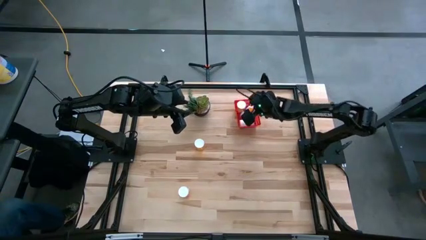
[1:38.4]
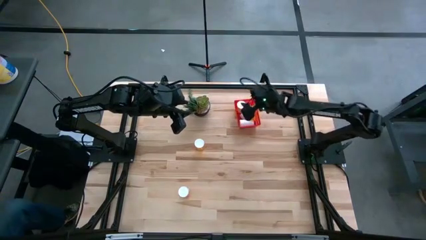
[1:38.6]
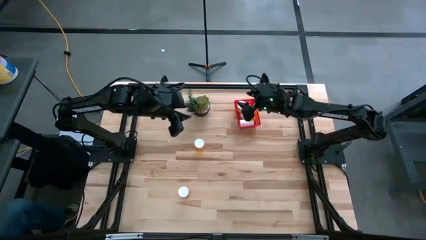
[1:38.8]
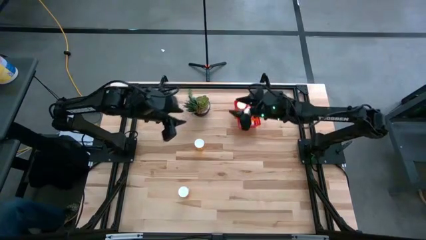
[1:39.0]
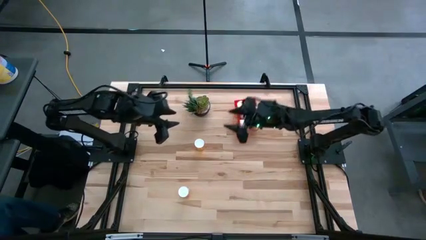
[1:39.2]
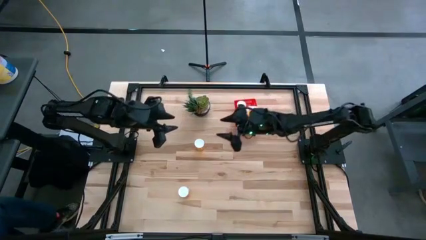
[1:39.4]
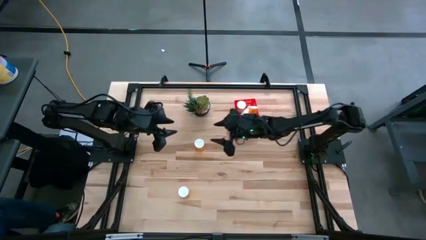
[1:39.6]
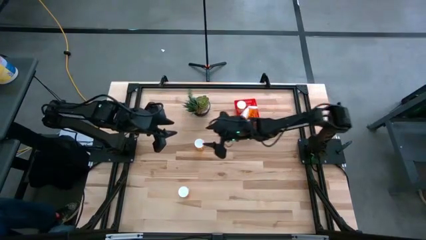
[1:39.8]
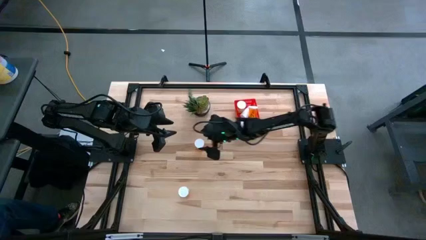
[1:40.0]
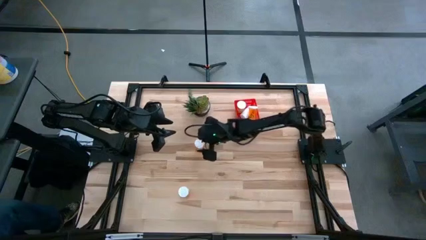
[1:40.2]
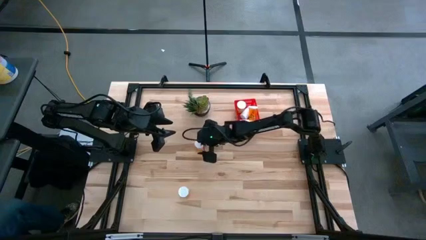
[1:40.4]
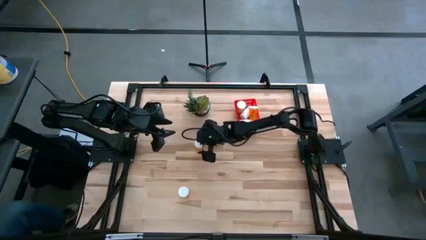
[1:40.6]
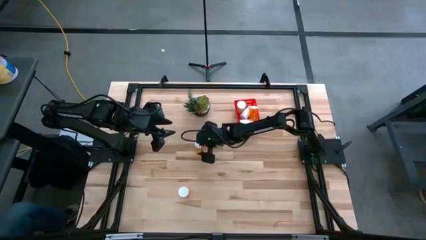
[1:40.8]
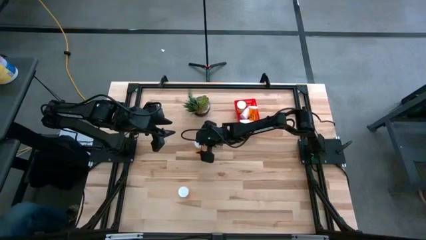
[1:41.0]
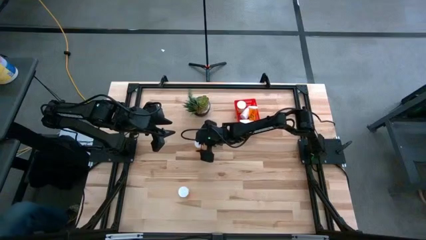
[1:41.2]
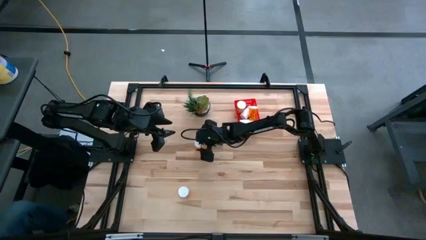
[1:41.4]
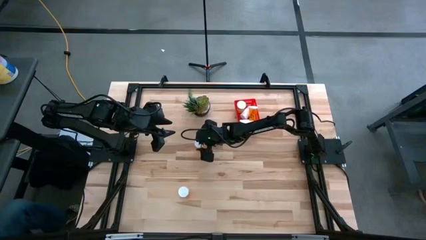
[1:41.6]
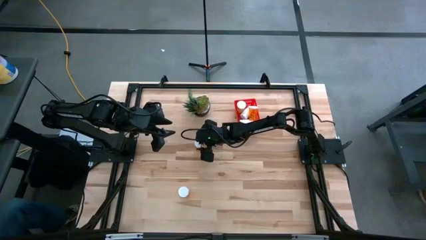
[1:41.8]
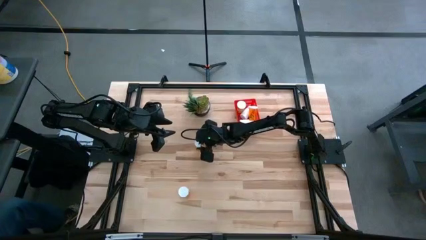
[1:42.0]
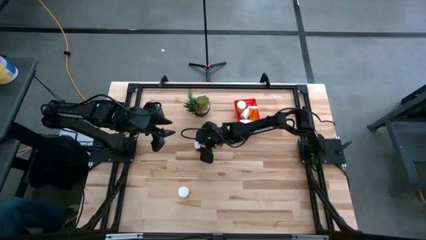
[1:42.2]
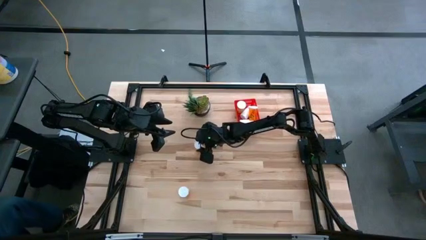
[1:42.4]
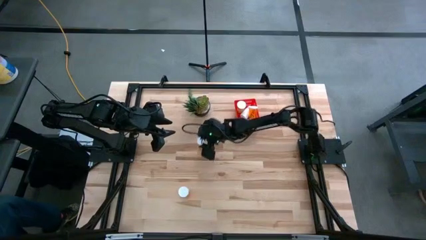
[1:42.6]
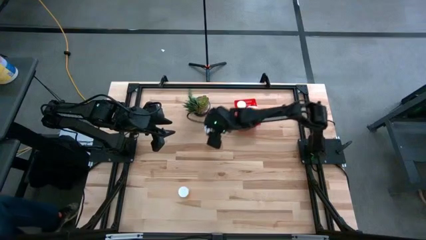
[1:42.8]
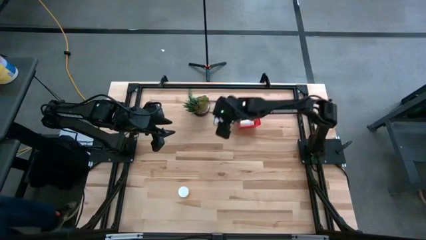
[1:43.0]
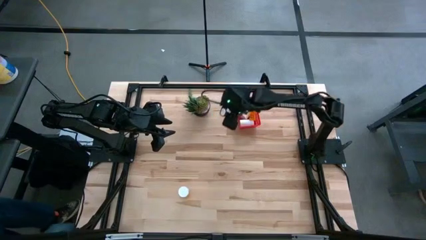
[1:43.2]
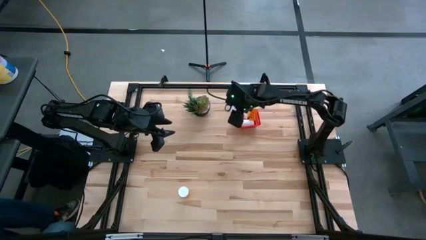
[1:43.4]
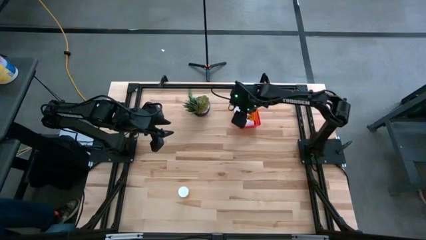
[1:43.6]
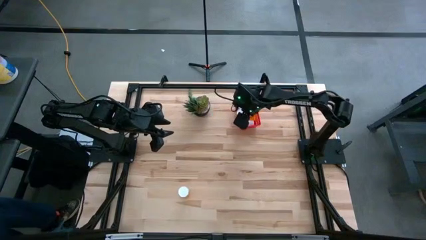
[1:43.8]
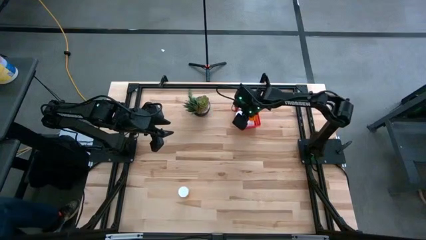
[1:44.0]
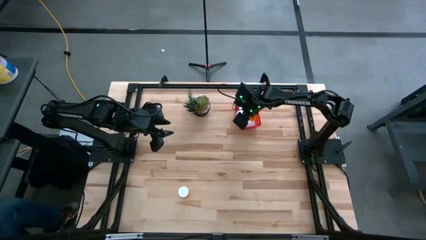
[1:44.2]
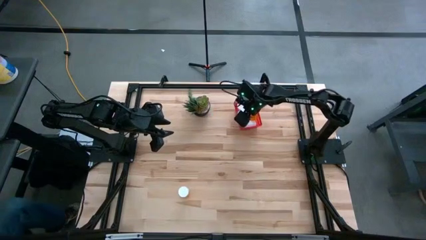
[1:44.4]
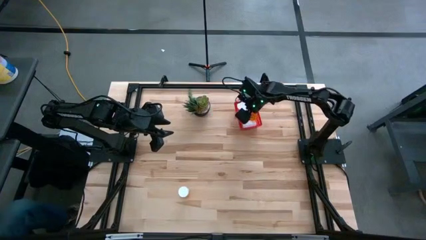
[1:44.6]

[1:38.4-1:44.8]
Task: Pick and place pill bottles into a basket
Put the top orange pill bottle into the red bin

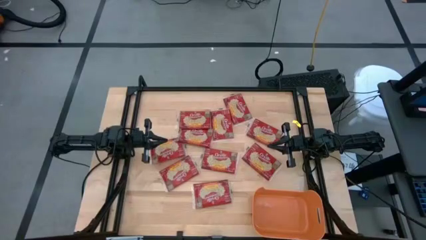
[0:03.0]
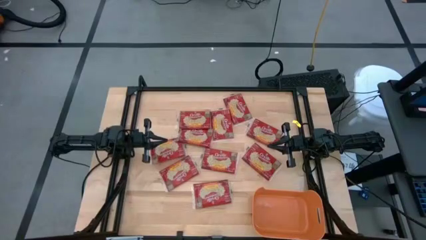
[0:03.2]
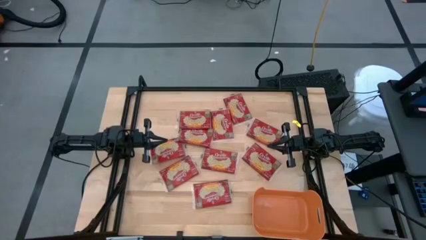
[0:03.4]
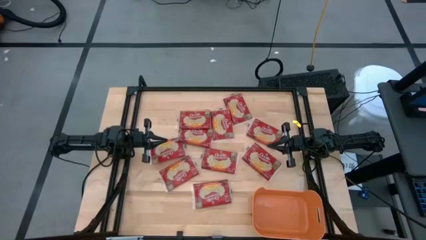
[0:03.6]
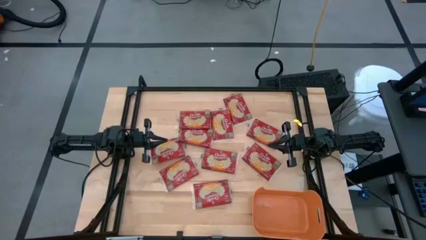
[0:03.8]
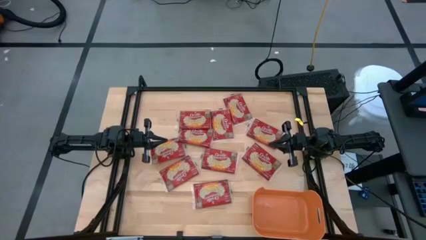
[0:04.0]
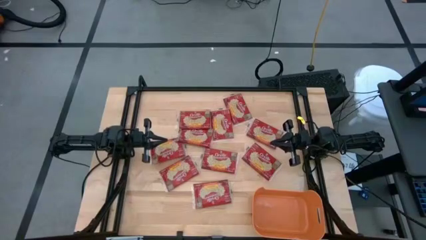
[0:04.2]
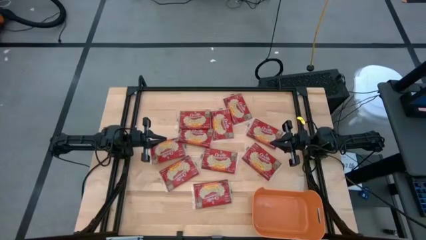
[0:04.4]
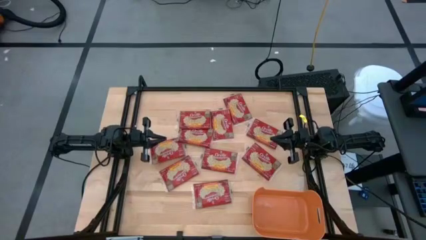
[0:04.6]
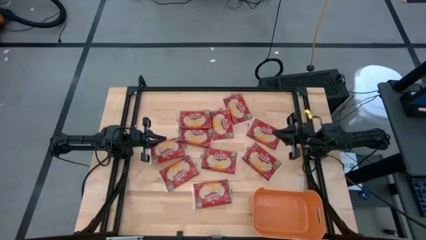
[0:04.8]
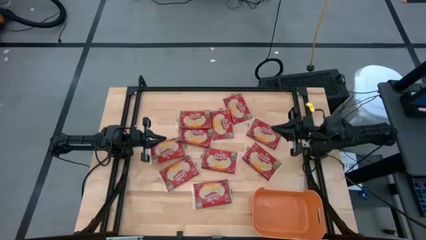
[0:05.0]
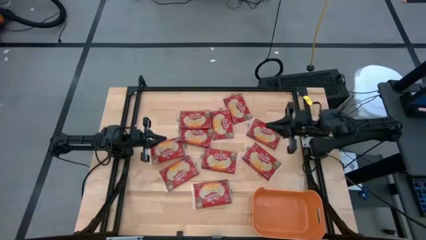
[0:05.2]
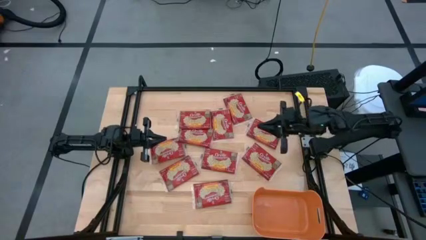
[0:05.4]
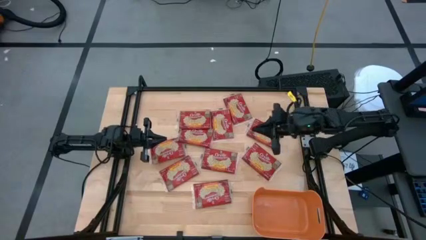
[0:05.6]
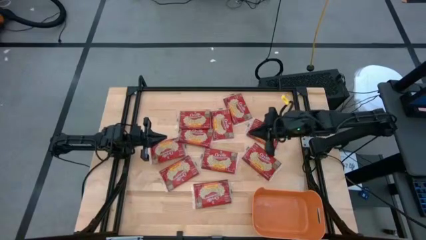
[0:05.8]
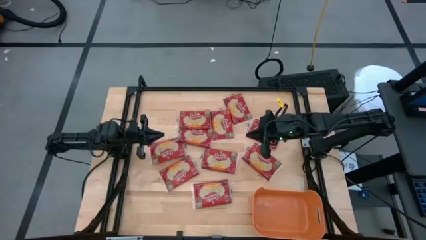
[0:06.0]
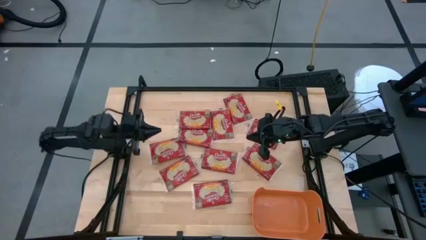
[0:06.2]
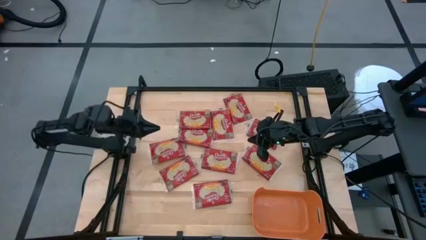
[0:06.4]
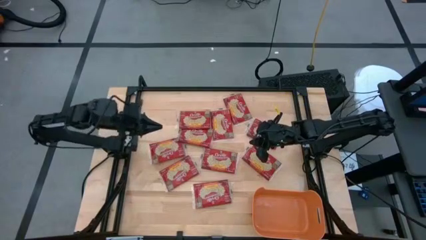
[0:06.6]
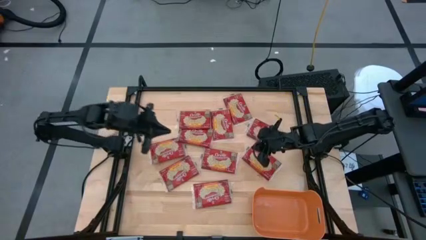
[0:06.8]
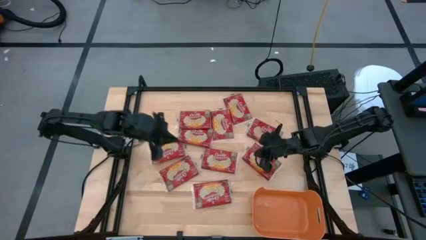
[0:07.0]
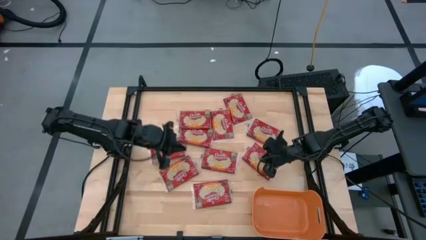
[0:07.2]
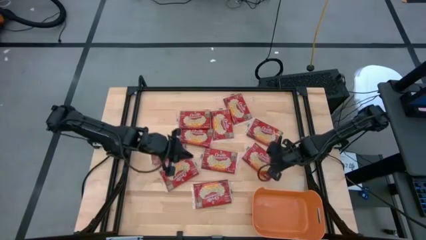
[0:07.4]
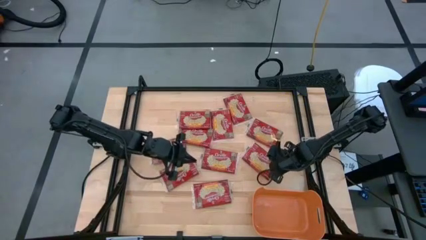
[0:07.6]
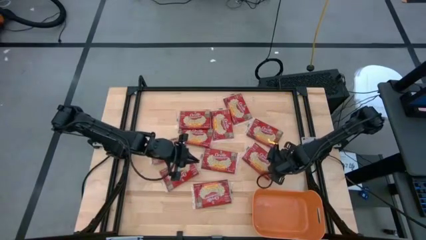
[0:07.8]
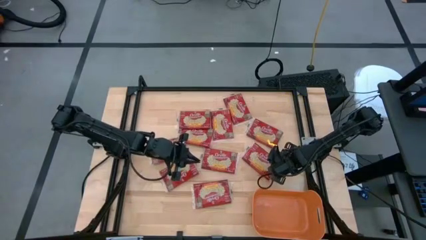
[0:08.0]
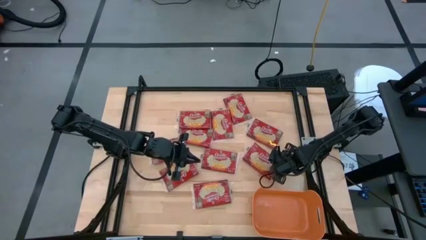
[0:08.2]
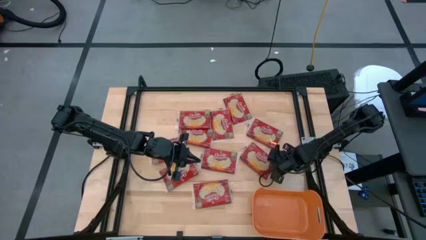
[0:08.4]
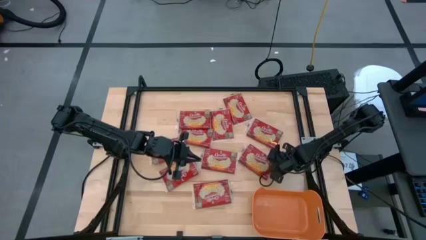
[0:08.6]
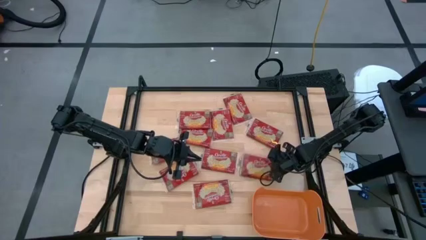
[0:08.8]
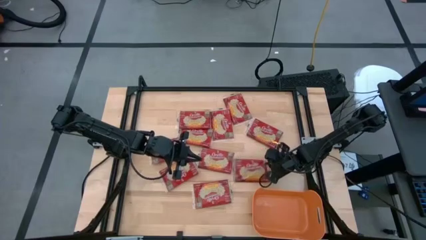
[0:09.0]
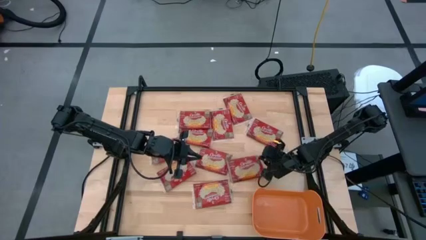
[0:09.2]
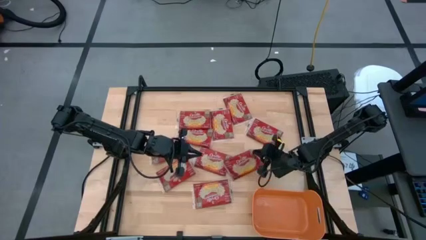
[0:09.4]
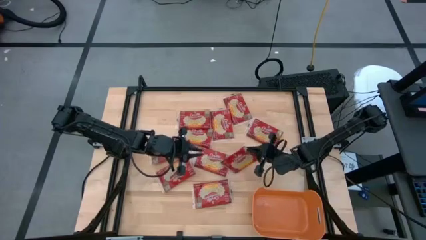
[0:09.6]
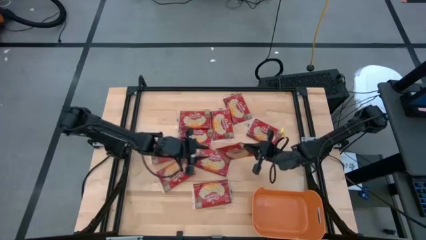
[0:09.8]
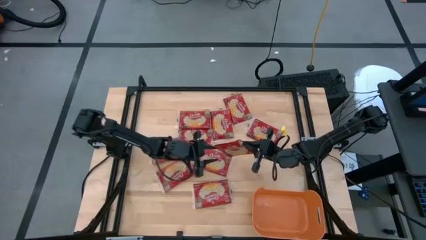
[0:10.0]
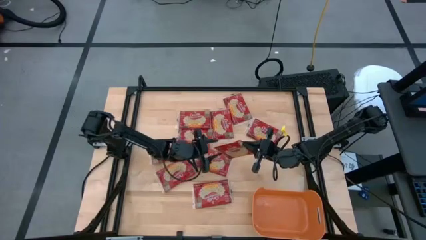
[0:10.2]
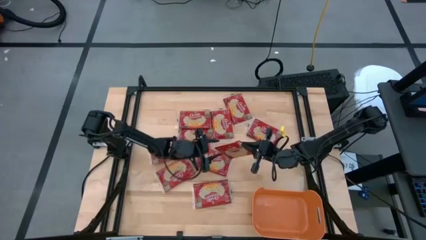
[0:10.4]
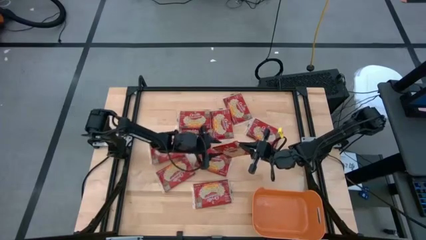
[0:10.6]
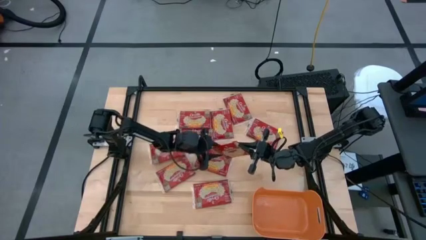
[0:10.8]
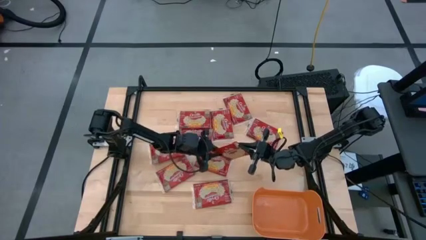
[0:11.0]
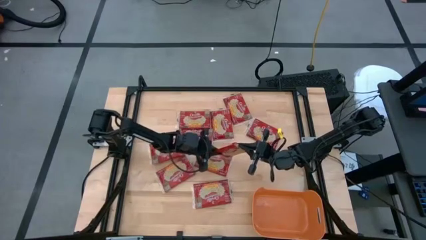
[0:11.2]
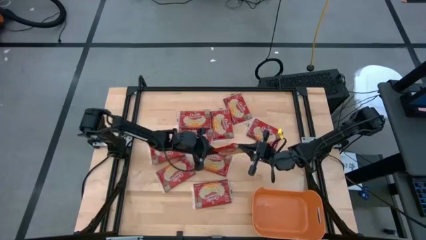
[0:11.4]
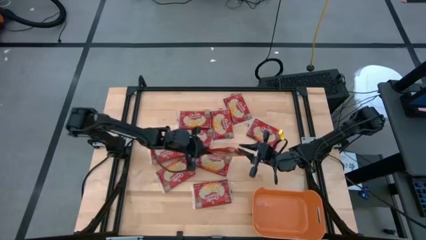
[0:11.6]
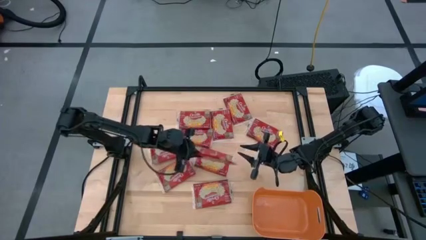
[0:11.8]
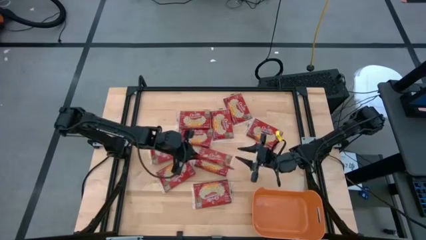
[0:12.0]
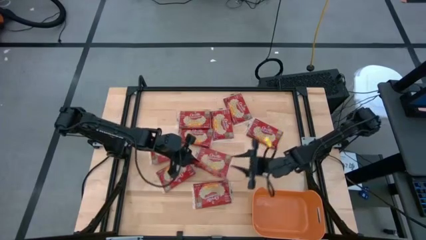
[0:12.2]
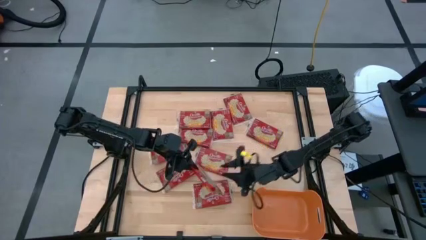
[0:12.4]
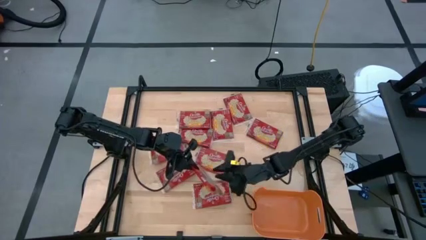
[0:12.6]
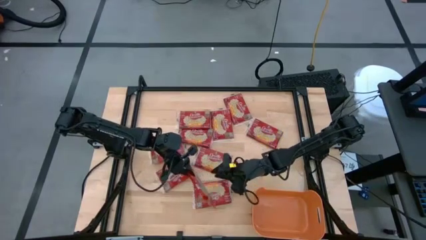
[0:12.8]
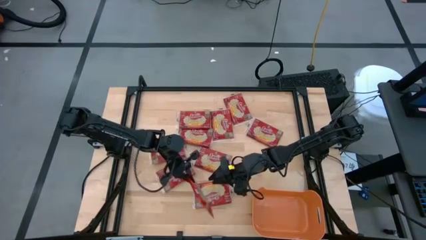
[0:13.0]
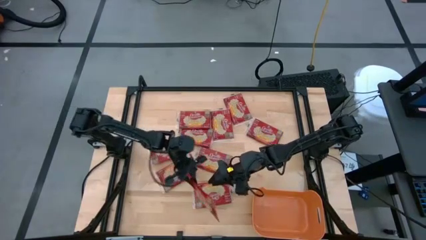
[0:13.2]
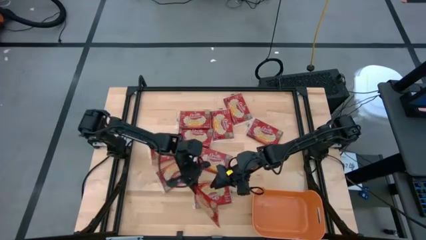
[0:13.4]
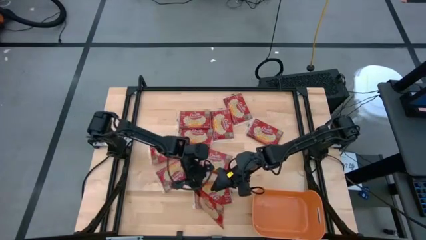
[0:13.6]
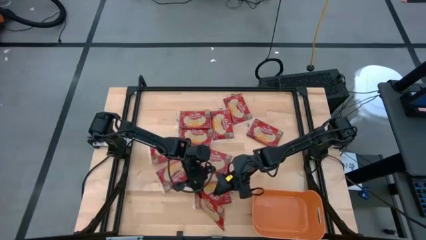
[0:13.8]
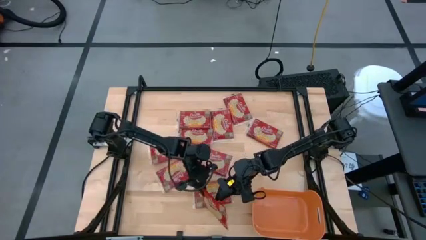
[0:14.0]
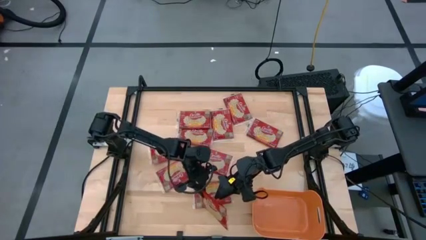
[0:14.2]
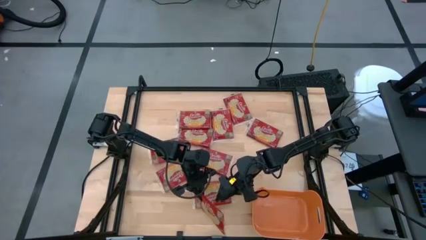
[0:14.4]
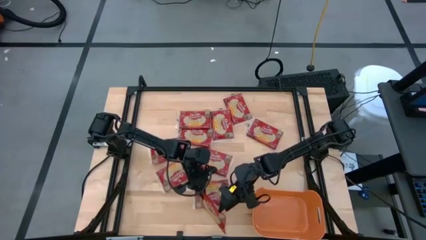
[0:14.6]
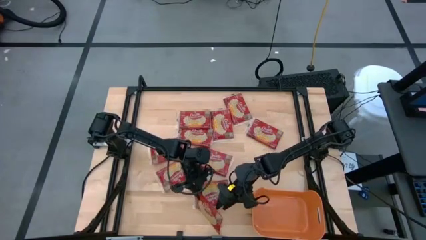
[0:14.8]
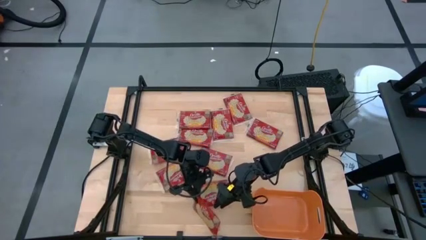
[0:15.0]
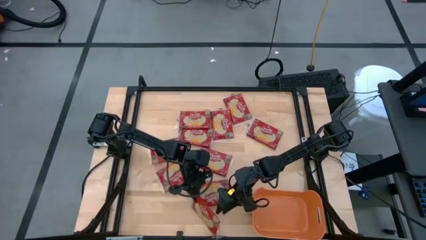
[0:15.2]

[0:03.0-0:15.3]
Task: Sort popcorn bags into baskets
Put the red popcorn bag into the orange bin
